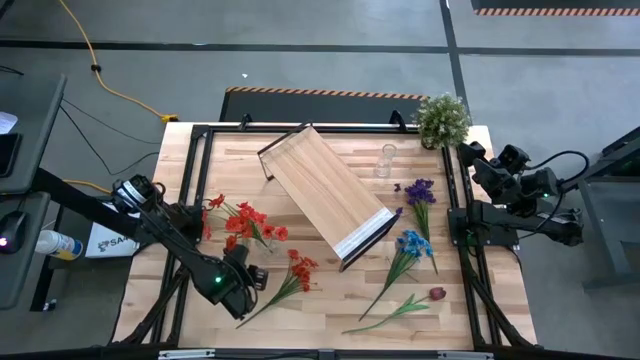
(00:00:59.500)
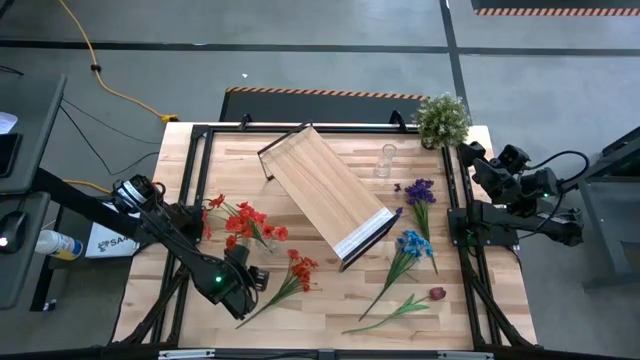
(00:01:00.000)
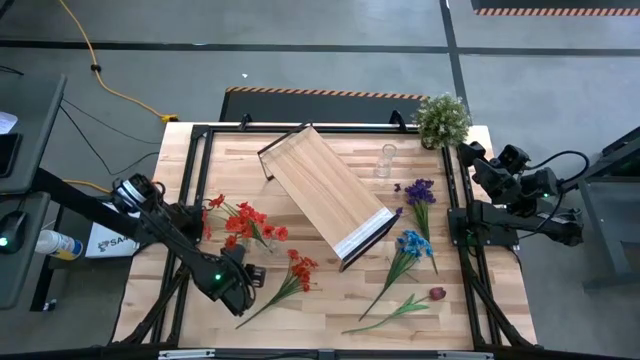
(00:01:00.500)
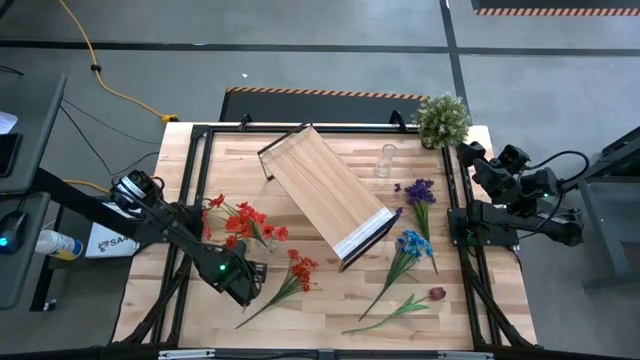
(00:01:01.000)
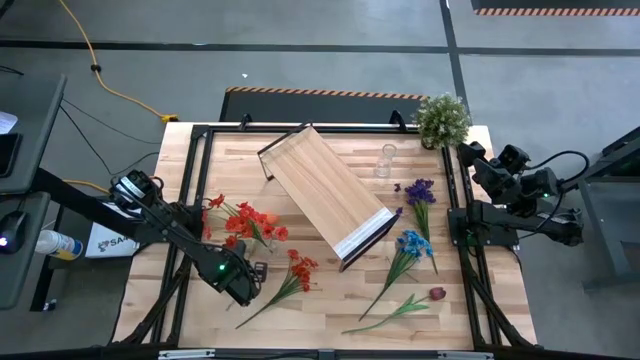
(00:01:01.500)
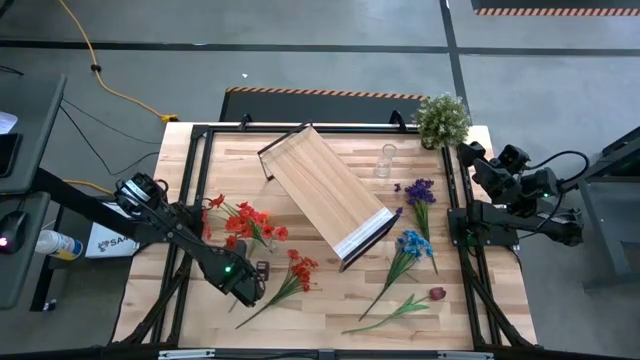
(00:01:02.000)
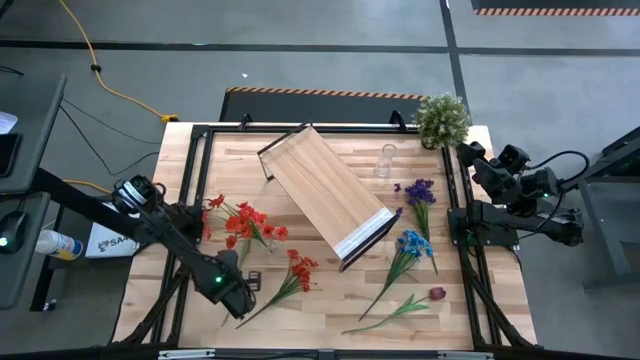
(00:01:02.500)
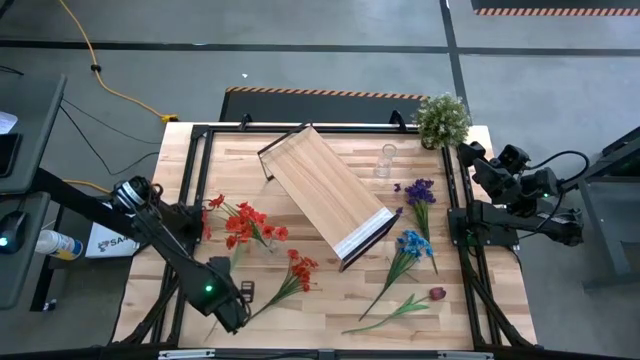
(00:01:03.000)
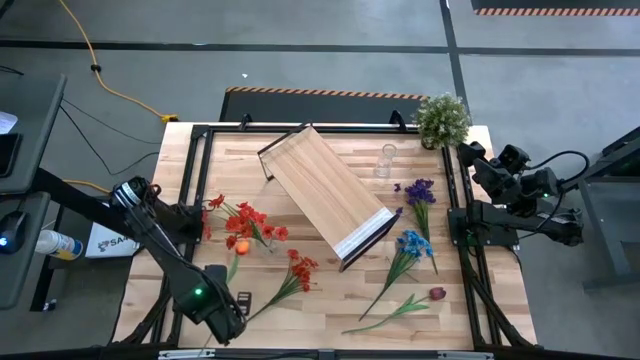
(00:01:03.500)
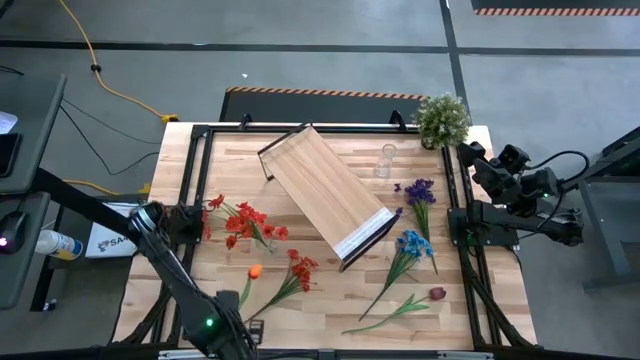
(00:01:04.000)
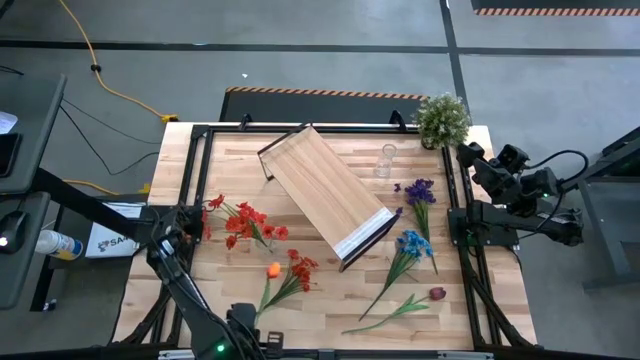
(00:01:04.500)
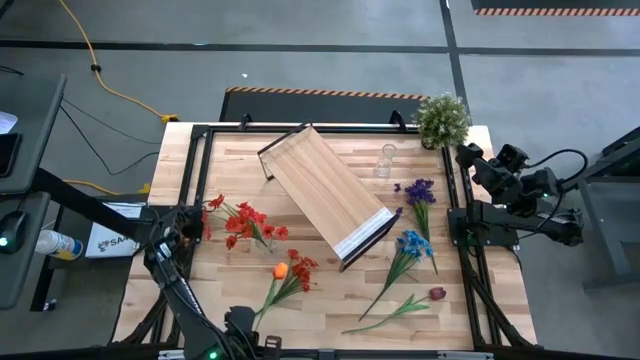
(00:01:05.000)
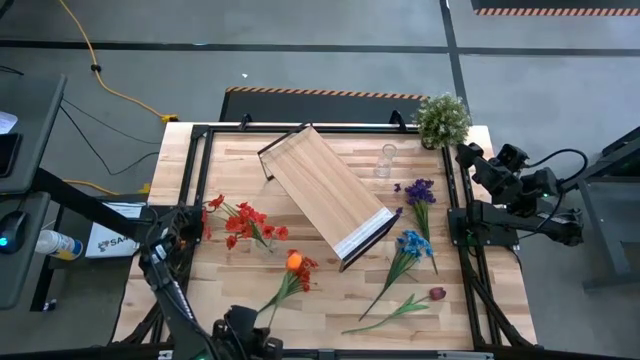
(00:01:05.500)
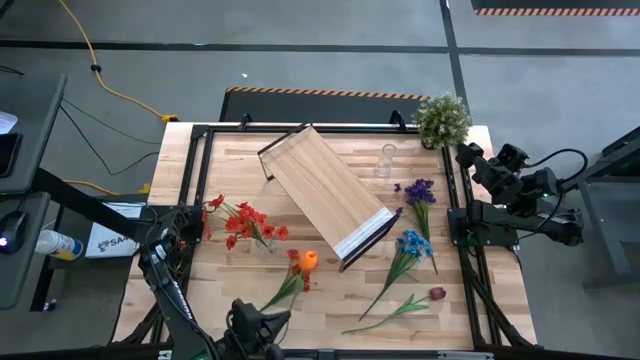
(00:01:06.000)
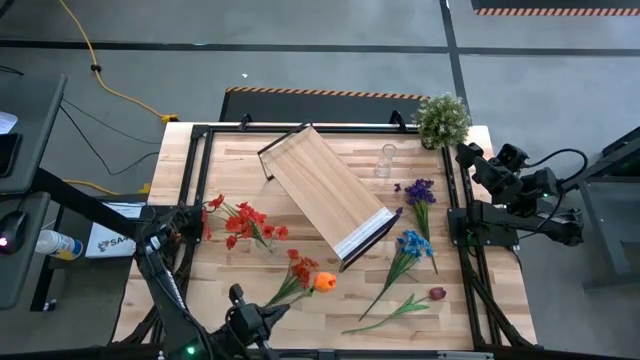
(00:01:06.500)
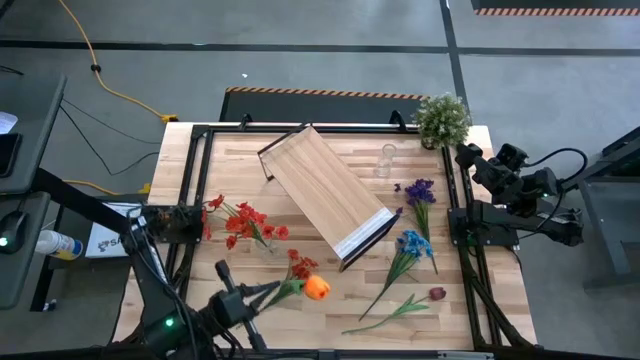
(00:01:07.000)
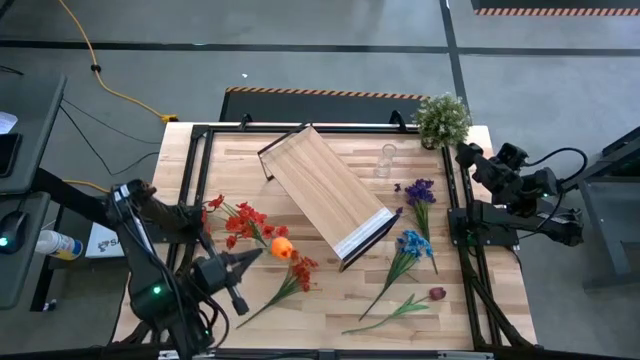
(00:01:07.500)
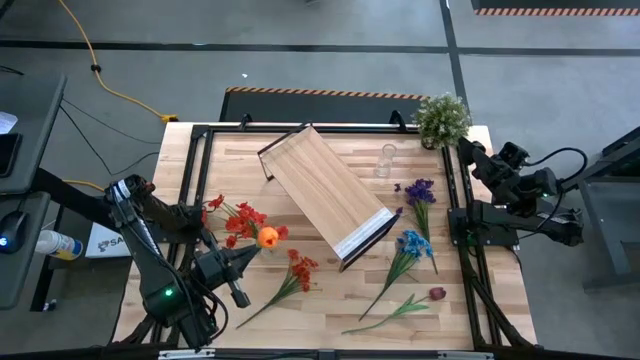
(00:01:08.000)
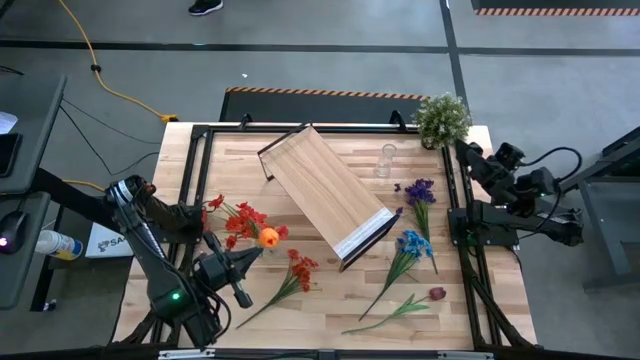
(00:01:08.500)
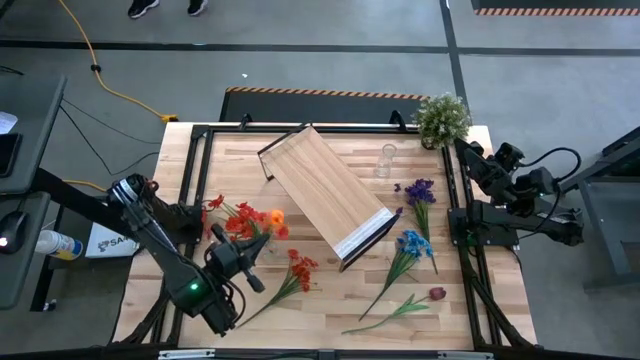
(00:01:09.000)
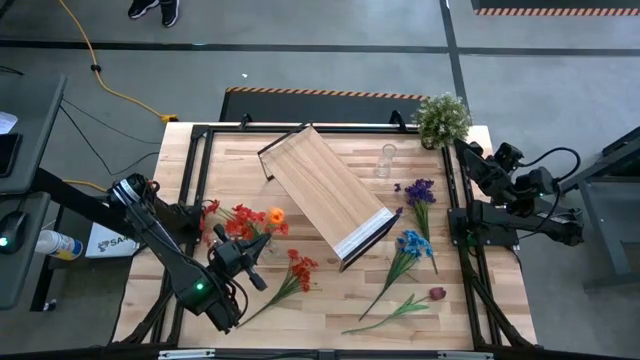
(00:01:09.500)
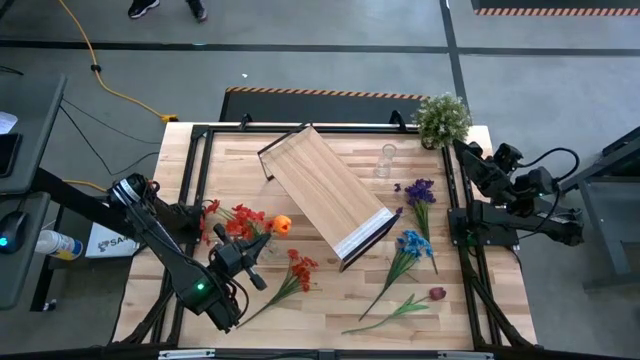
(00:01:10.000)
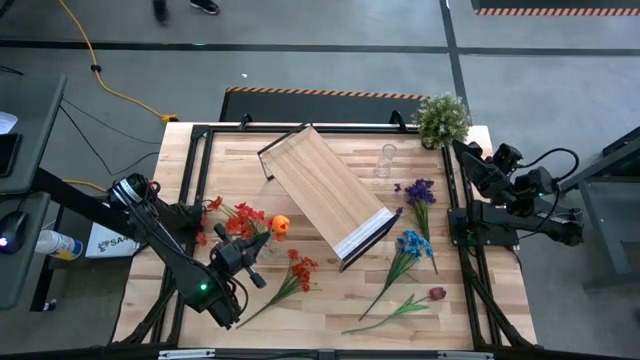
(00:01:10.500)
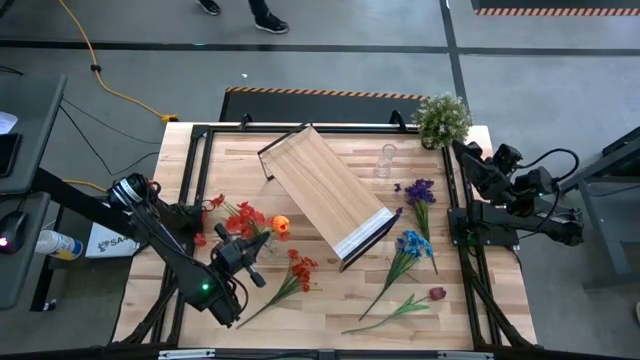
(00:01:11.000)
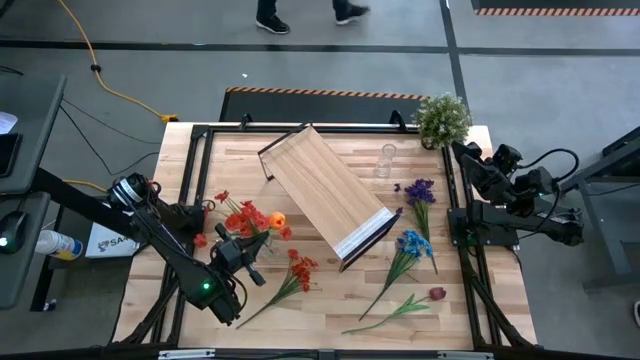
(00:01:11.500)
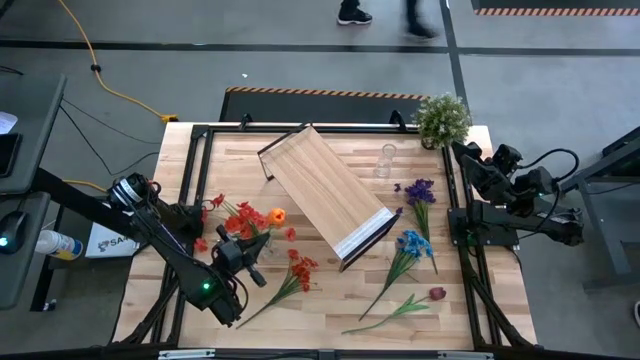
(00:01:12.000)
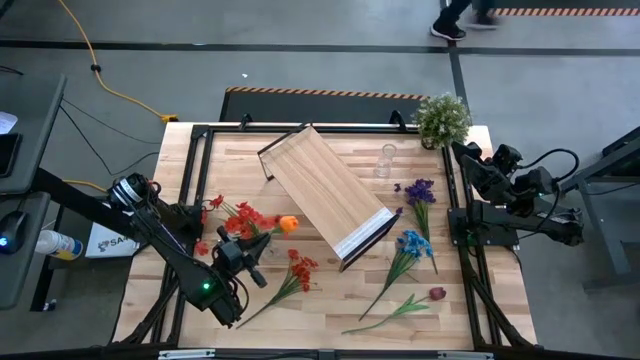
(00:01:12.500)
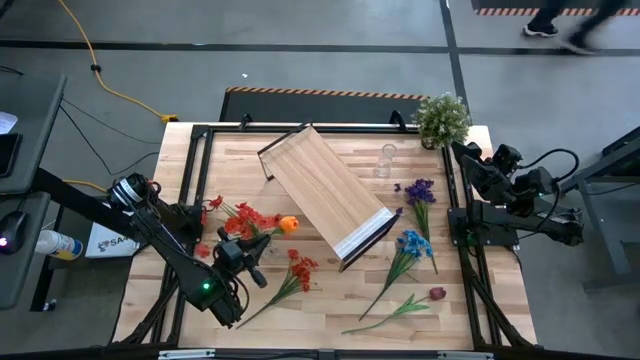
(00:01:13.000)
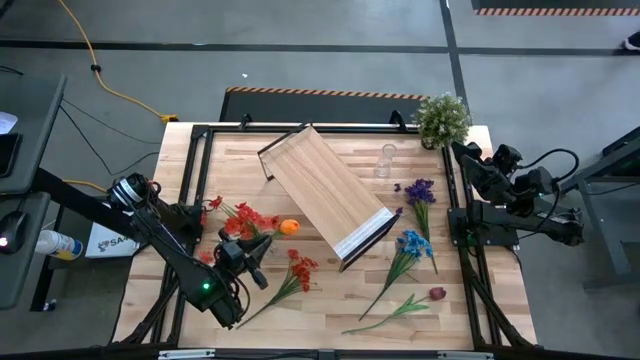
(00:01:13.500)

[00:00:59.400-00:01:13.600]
Task: Pick and place flowers into a vace then onto a shelf
Put the orange flower into the bottom transparent vase

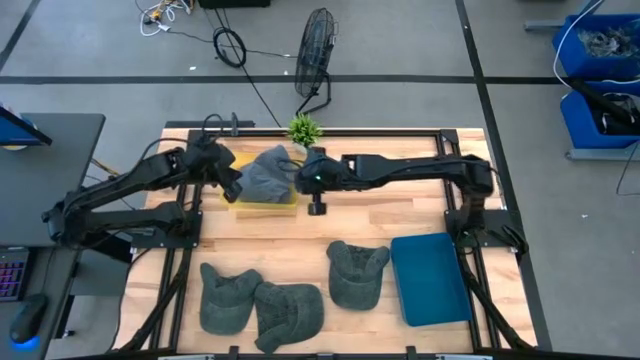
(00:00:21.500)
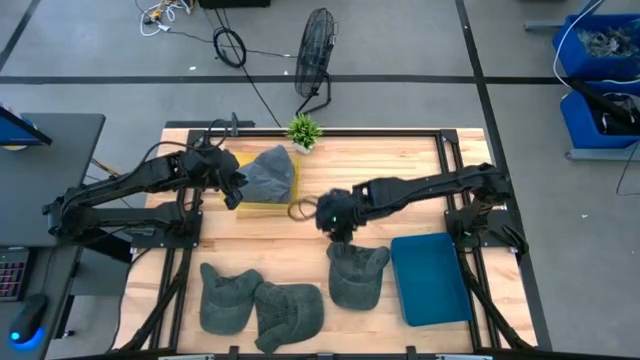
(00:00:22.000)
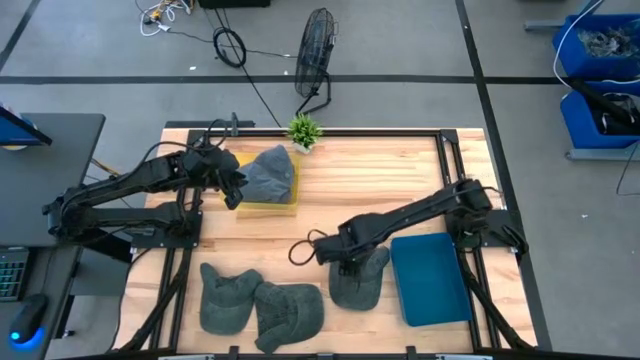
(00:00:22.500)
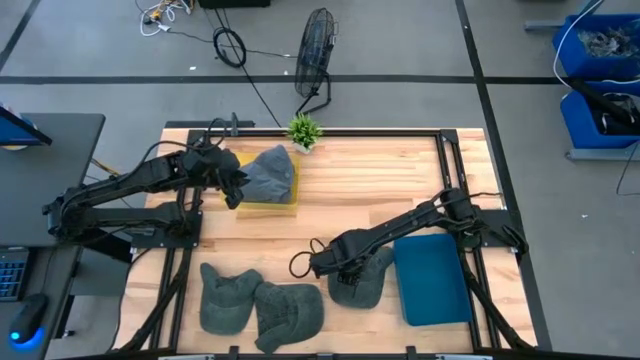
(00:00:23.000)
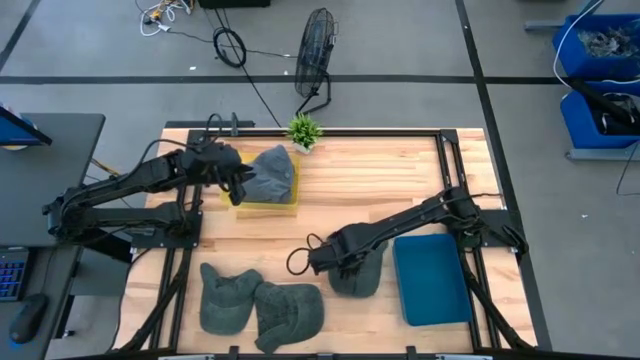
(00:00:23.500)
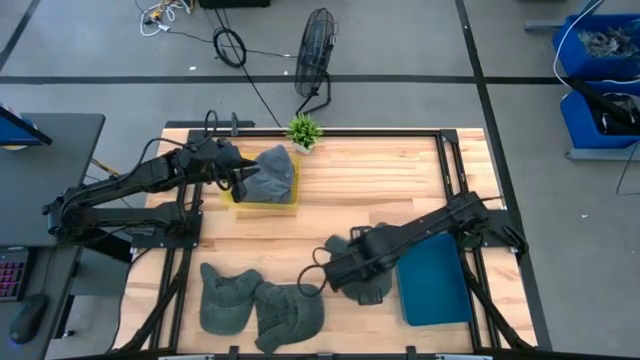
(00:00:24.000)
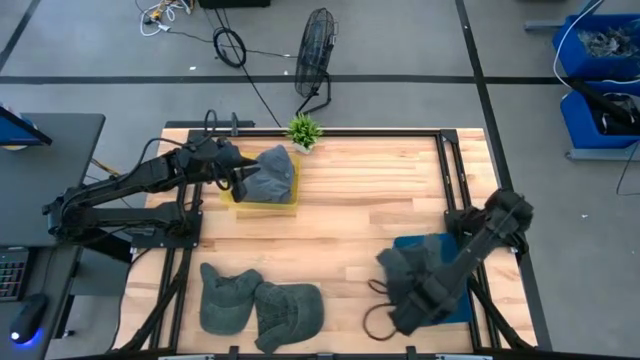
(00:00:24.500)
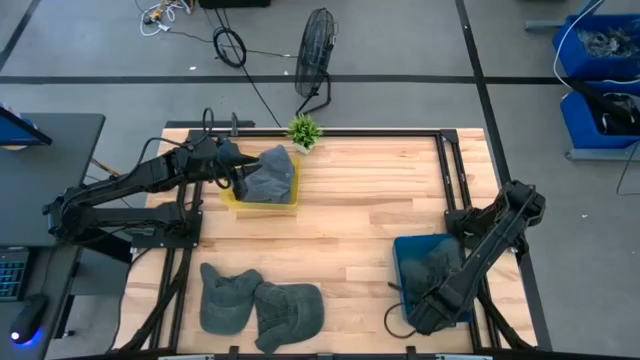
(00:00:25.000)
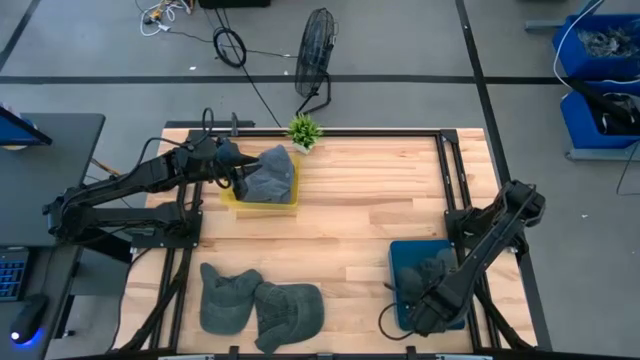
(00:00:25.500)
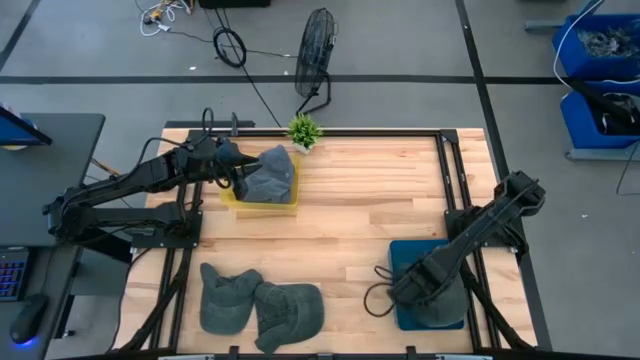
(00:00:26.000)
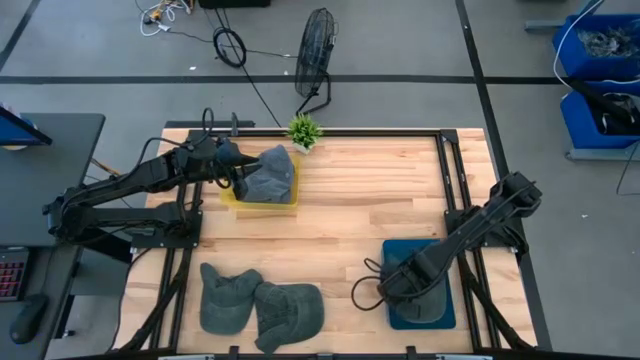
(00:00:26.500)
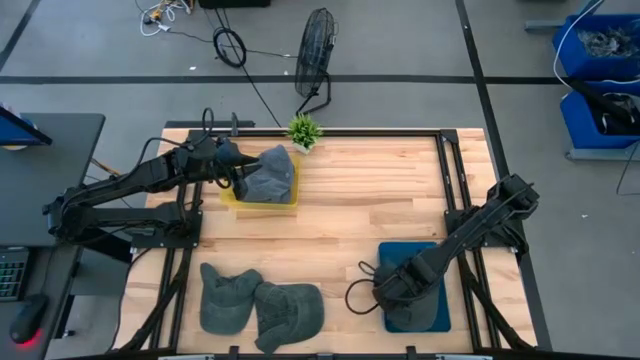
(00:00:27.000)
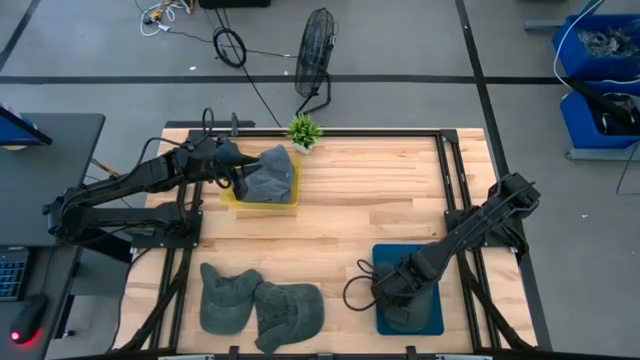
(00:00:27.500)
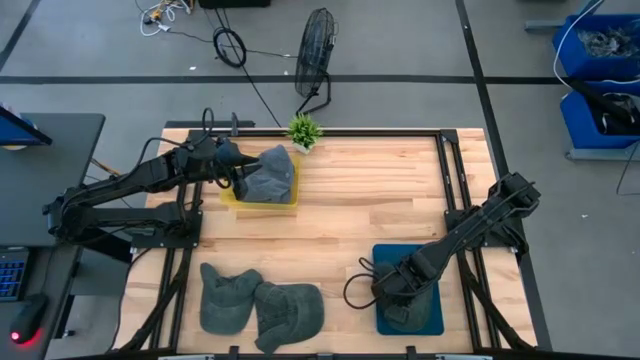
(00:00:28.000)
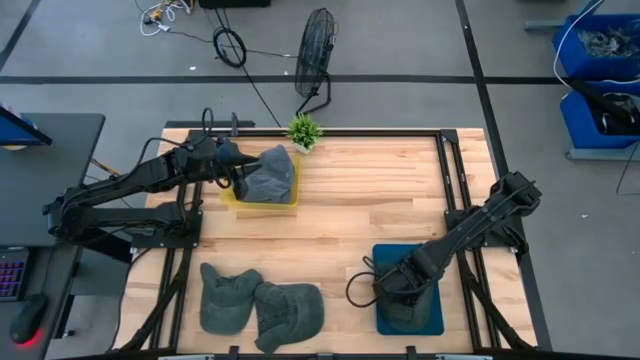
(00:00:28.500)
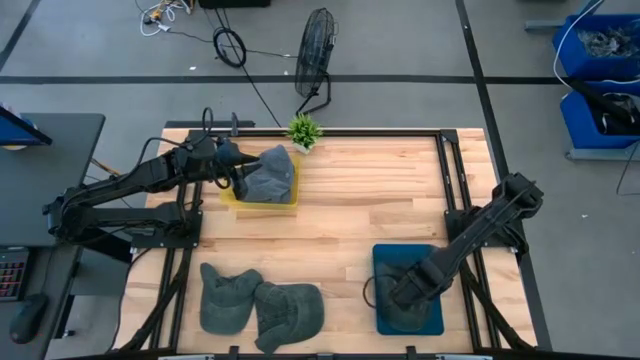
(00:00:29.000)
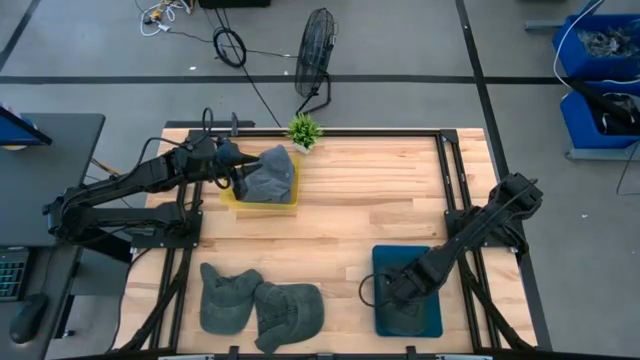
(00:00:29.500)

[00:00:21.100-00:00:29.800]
Task: Pick & Place hat
Put the right black cap into the blue bin
